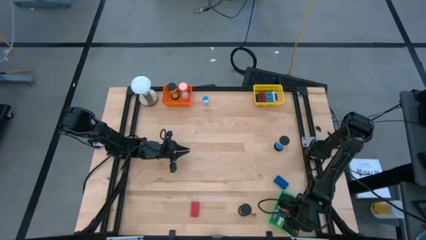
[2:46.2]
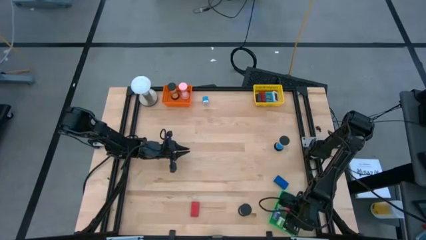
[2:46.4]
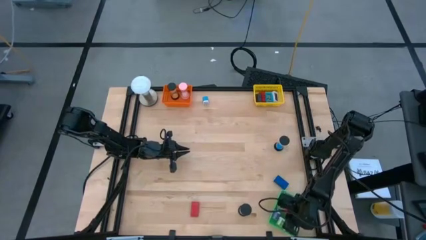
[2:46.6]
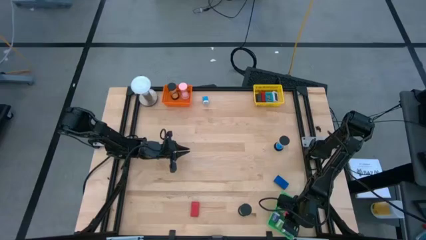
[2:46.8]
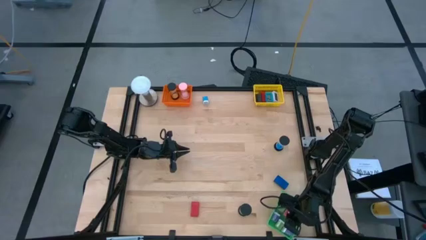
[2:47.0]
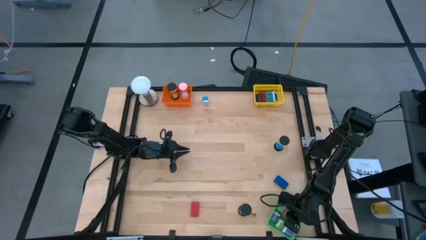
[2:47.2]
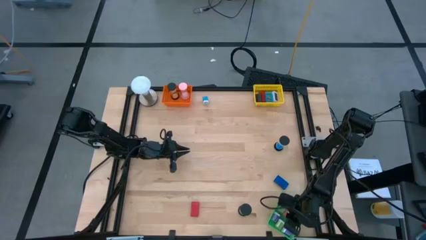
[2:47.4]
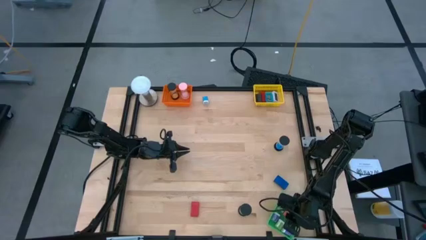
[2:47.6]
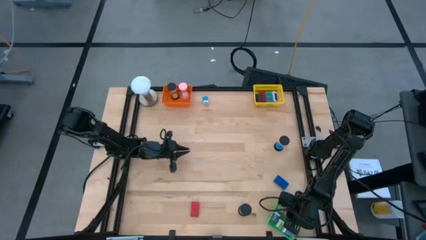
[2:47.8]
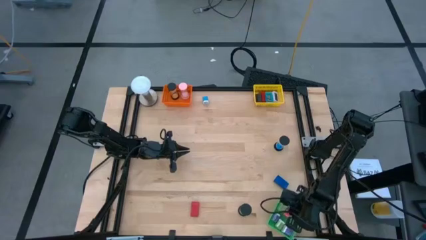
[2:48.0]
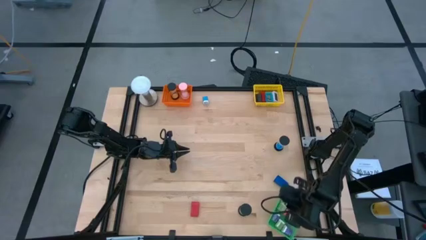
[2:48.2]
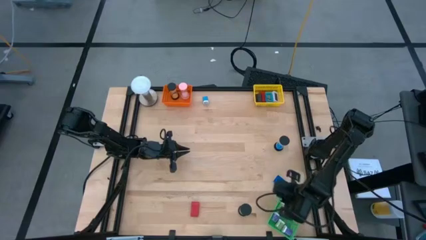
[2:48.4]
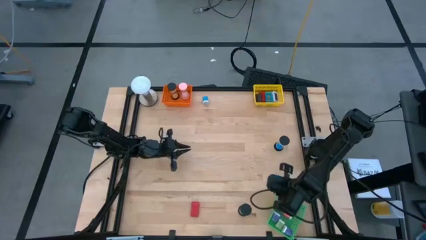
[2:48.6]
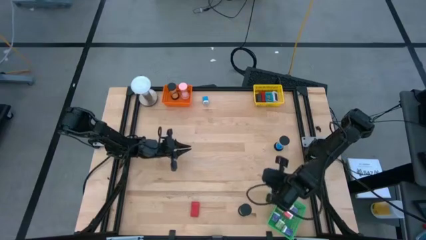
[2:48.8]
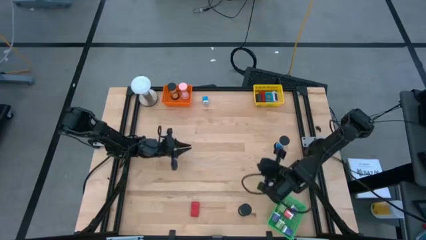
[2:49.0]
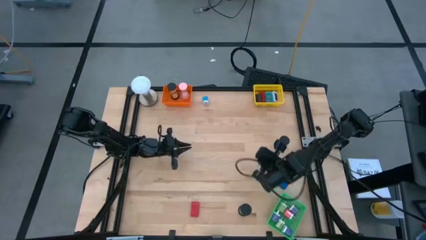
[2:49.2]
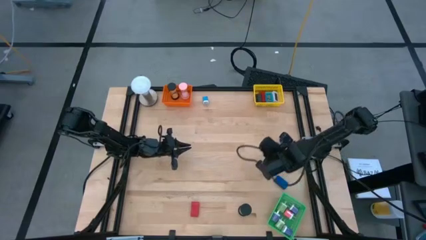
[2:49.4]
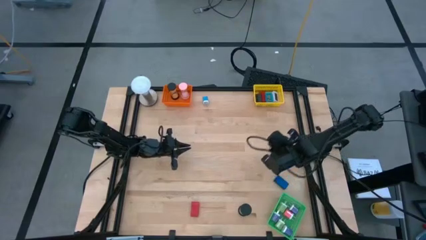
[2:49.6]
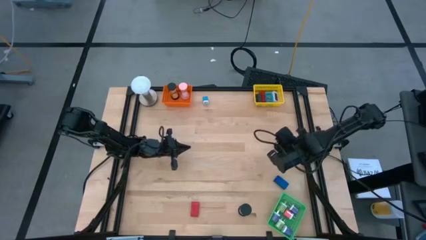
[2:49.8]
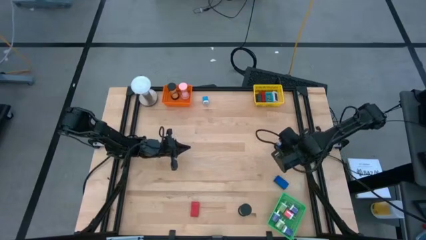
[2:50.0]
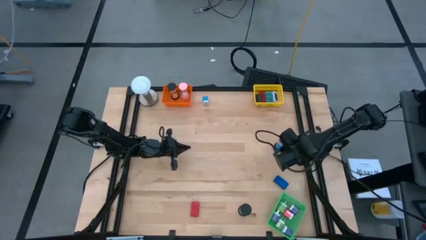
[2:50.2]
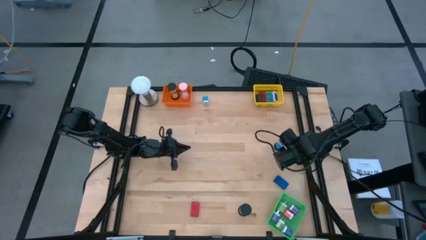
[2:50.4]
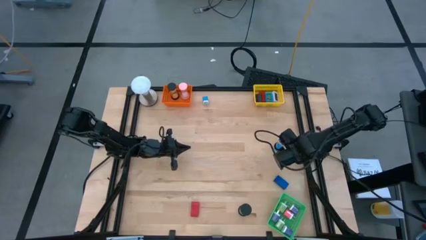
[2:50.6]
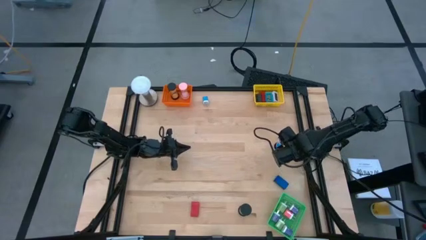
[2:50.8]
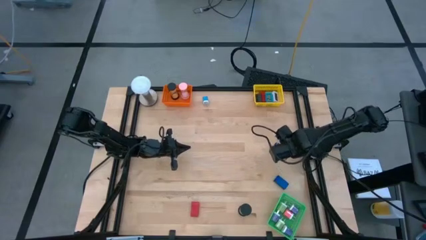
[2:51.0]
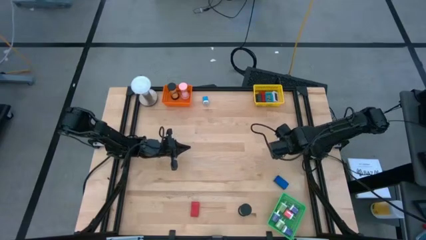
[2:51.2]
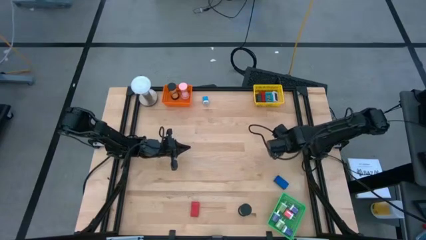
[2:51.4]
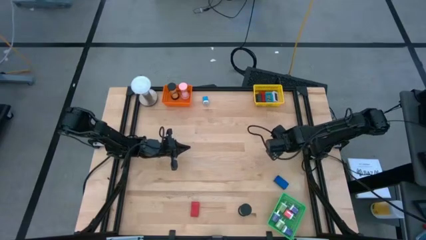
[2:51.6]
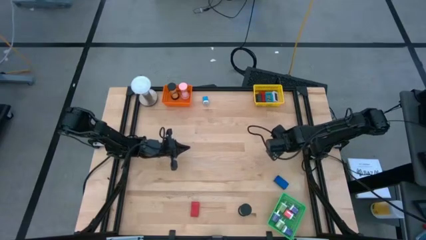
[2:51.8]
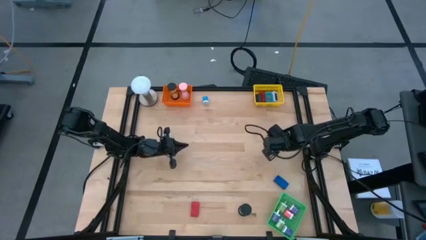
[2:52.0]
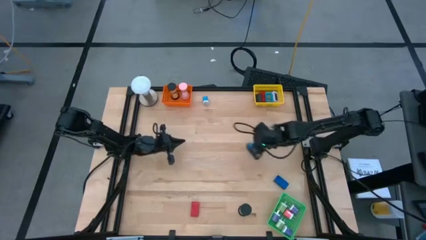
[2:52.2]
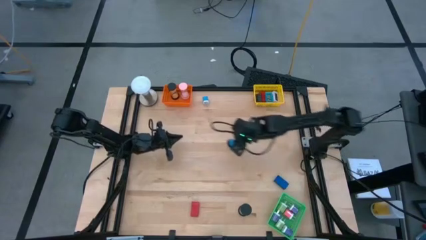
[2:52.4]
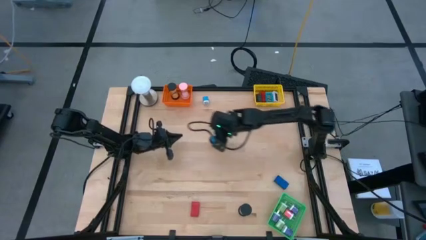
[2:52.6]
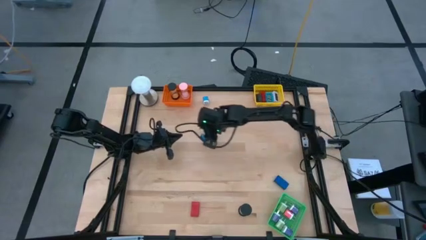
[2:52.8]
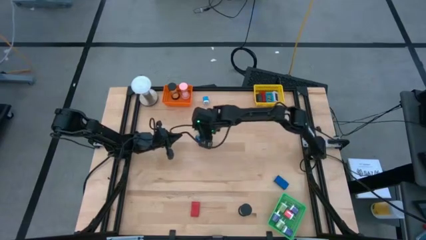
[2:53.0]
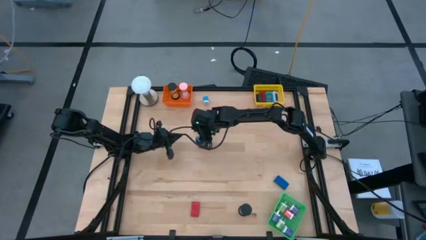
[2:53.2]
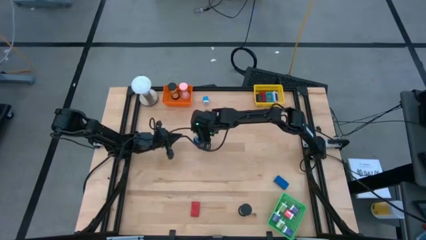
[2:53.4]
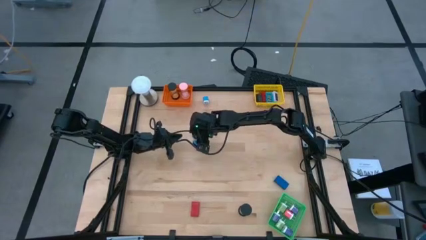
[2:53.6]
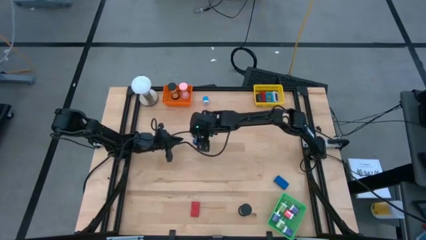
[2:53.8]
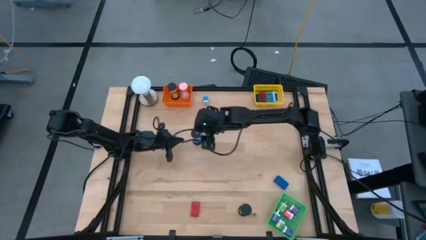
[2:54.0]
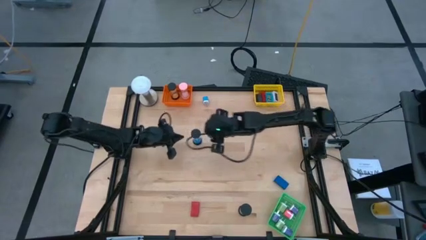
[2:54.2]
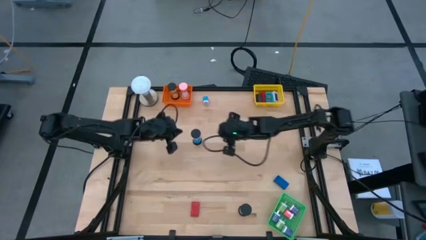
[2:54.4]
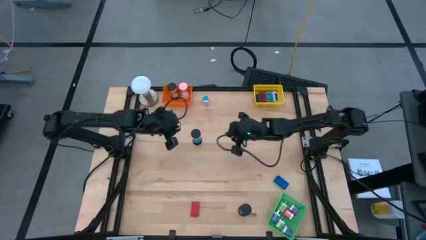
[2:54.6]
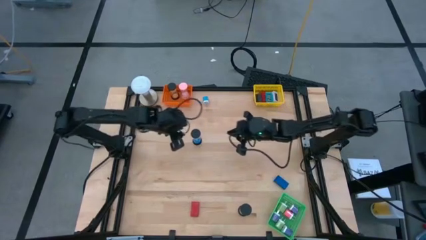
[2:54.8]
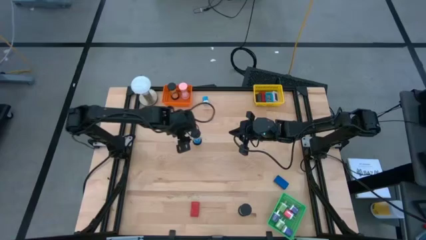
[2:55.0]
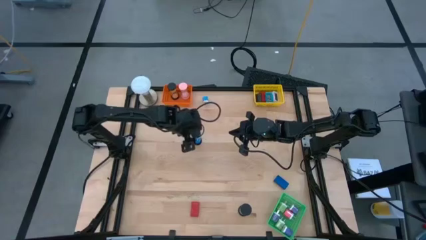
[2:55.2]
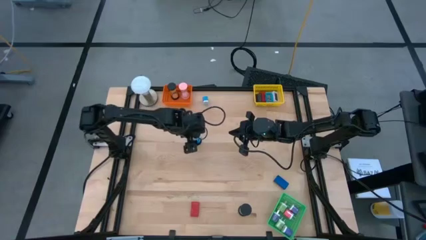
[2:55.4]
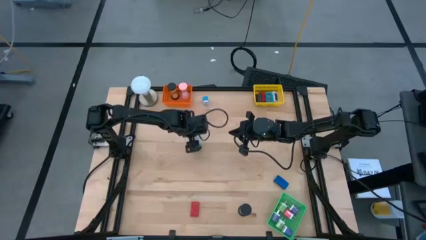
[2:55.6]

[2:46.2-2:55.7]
Task: Pick & Place Office items
Put the black hourglass into the red basket

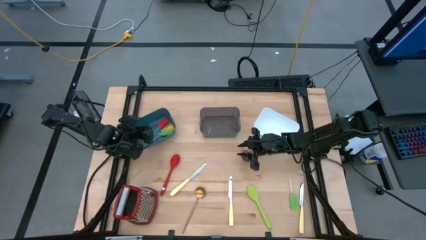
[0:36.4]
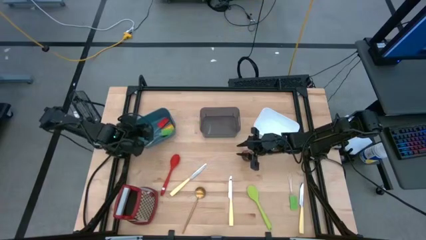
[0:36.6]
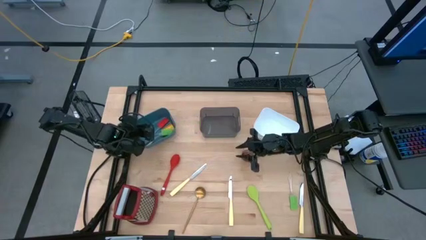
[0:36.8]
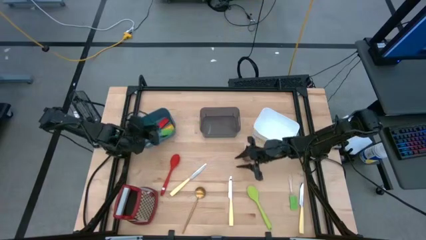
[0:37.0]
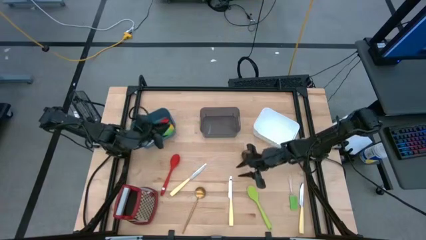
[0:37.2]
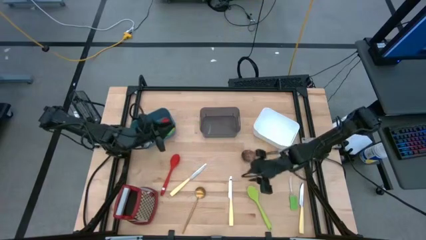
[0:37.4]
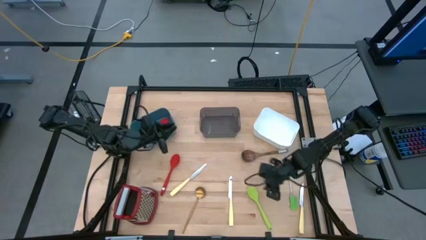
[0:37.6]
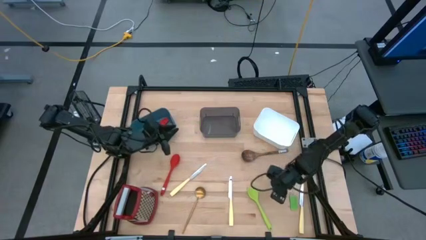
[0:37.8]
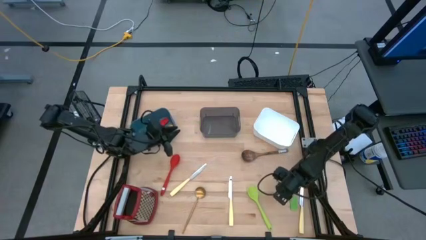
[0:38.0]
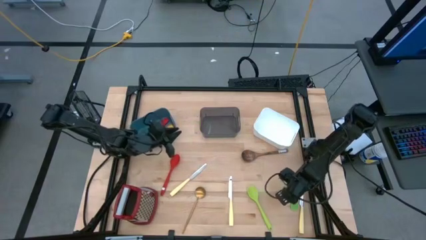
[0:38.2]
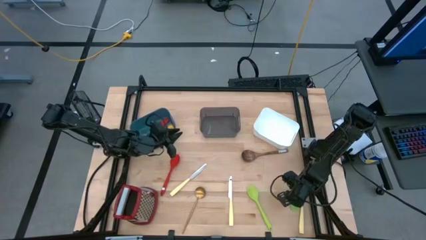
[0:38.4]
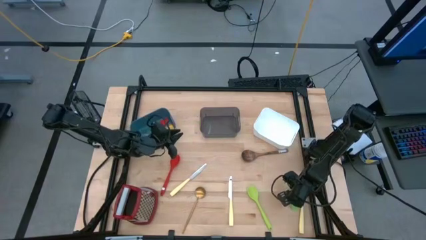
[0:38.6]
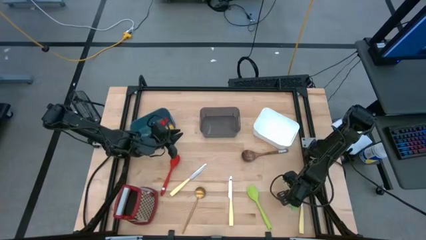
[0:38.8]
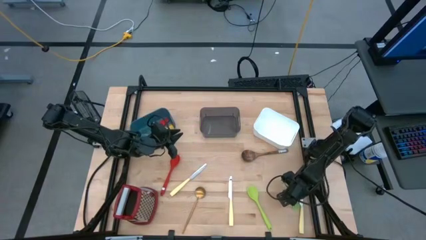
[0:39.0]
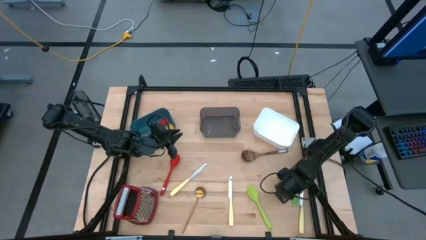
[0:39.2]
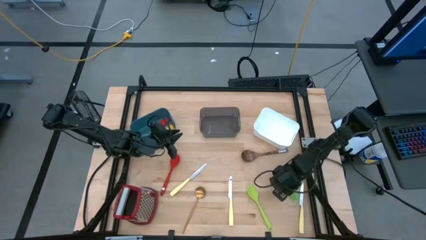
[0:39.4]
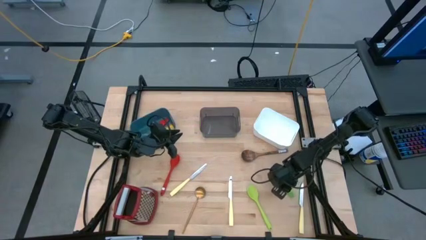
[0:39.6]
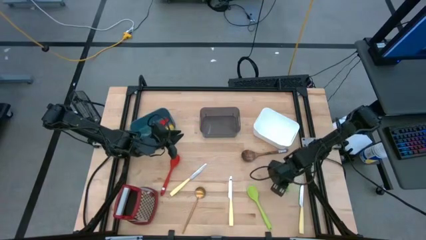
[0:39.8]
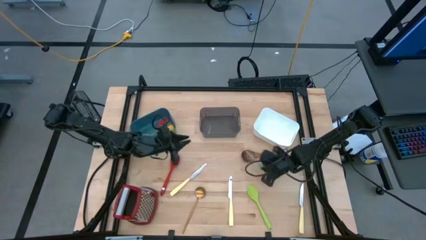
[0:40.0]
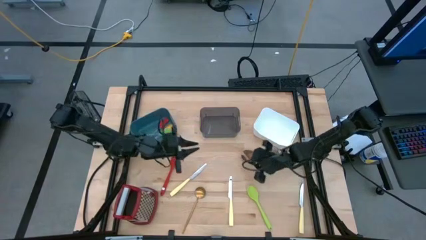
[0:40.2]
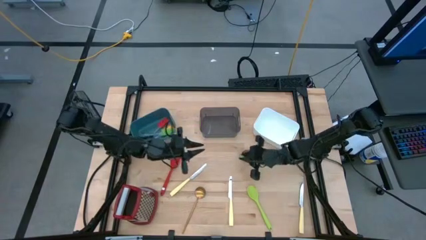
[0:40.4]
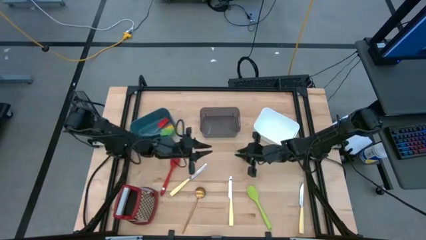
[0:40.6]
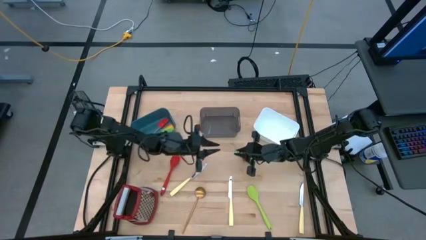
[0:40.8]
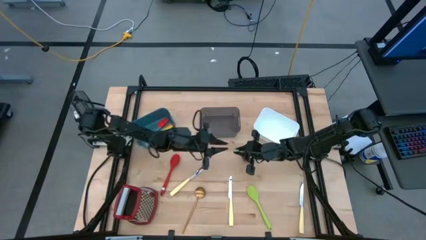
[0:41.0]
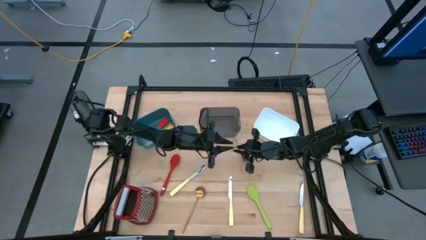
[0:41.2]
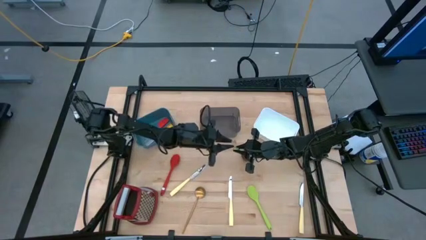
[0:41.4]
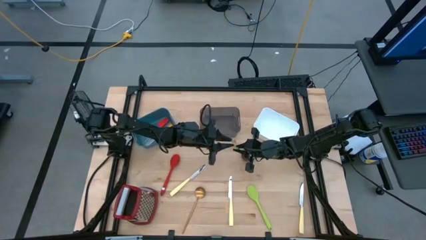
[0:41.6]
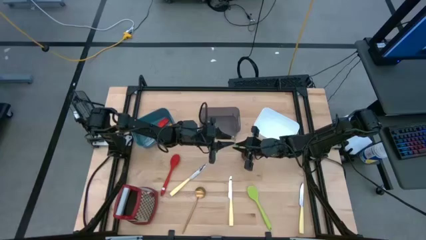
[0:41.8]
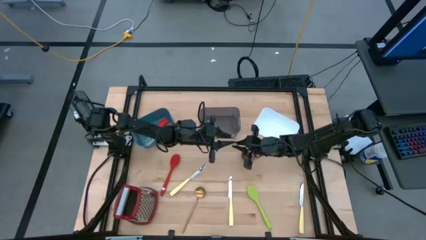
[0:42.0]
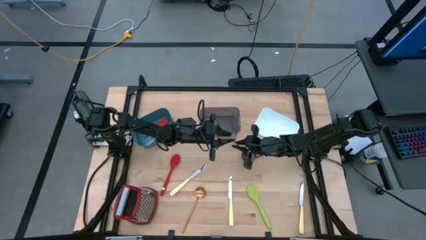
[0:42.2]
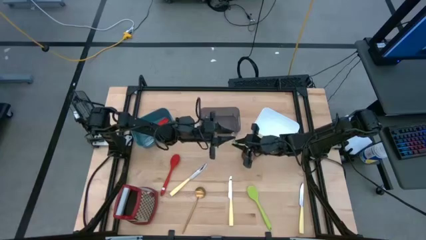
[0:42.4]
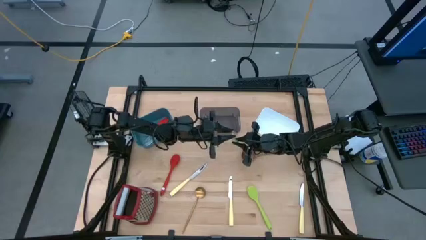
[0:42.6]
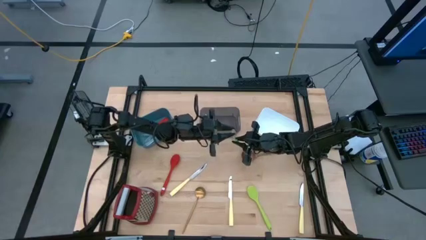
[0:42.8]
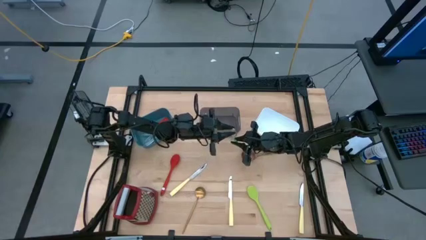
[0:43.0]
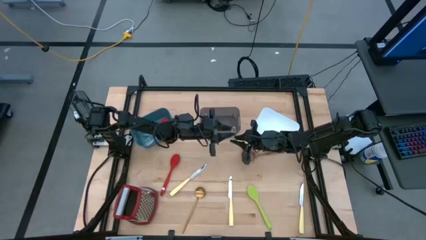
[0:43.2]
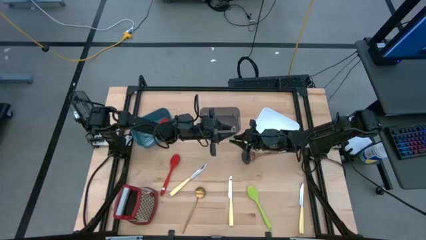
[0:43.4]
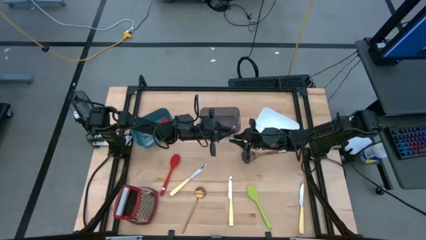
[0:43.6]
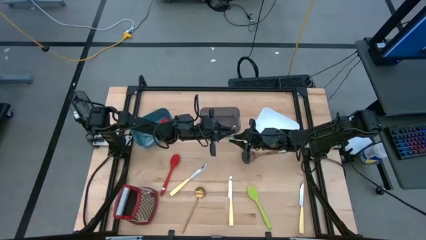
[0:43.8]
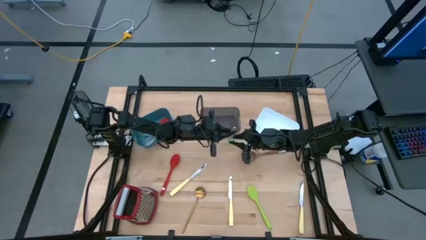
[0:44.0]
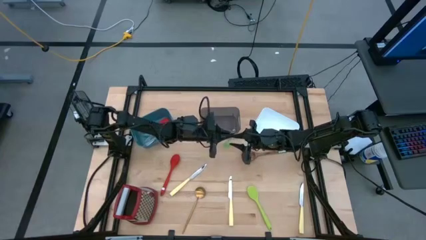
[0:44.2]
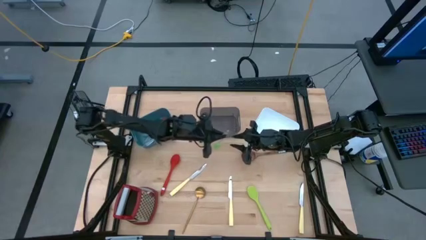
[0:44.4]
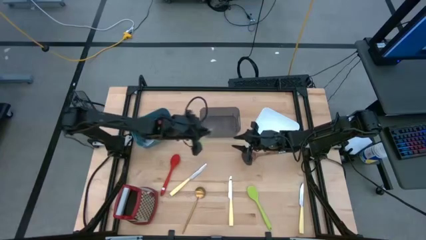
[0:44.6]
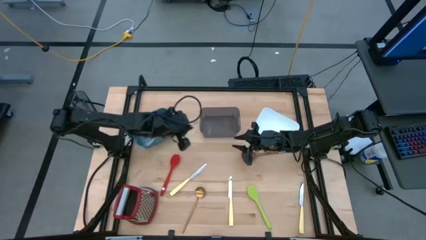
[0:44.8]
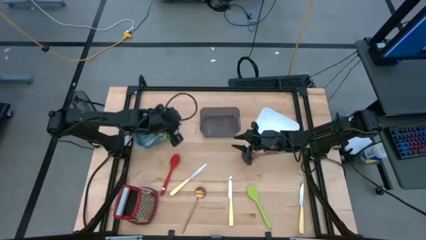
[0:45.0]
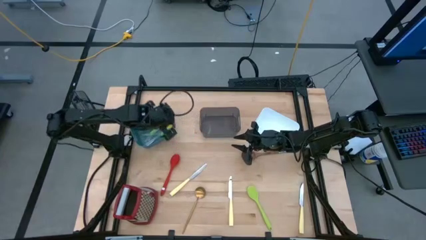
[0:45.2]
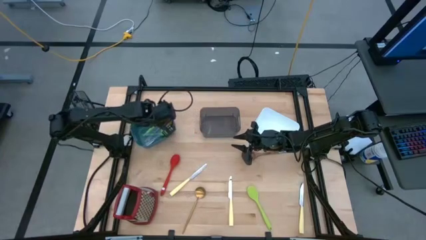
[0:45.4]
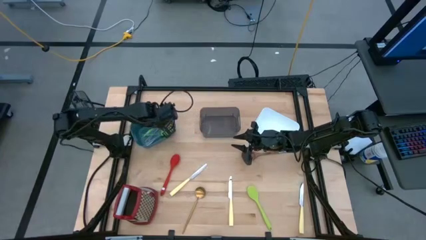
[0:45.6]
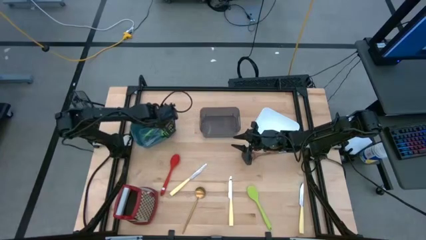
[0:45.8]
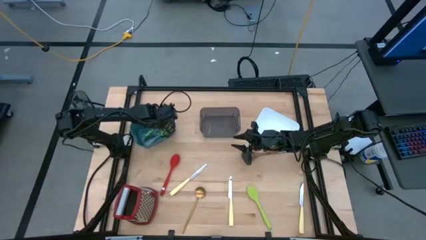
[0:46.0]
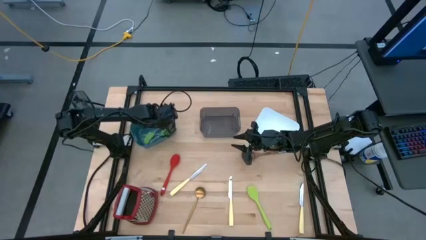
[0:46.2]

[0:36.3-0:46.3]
Task: Pick & Place Kitchen Items
Put the green spatula into the blue bin
